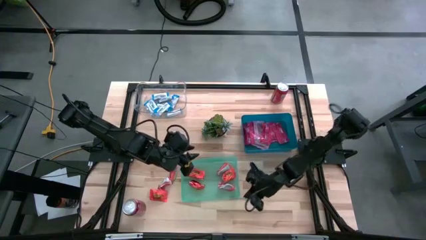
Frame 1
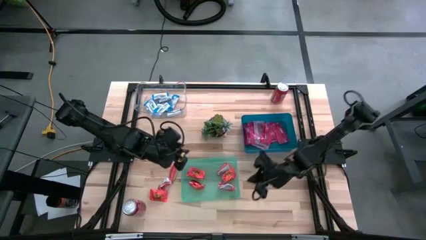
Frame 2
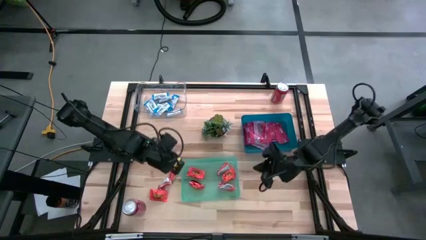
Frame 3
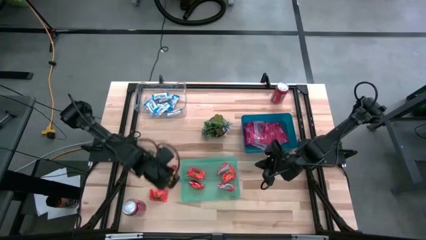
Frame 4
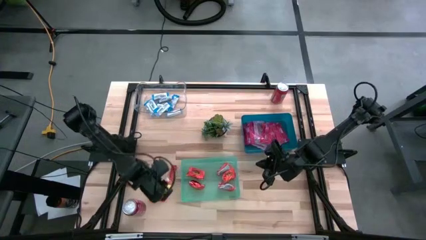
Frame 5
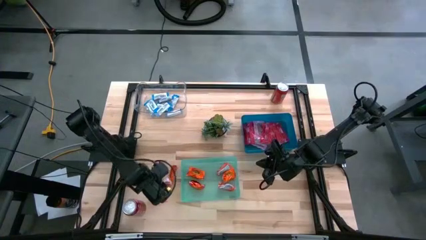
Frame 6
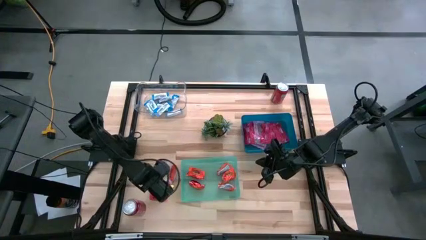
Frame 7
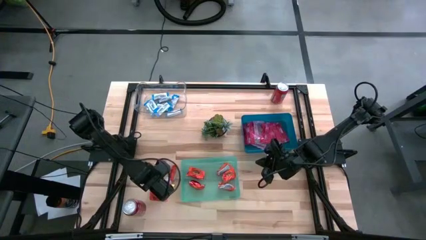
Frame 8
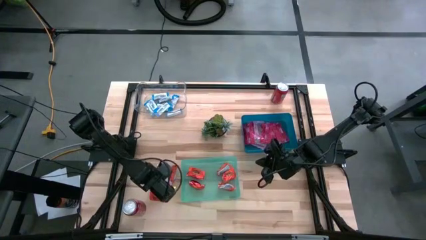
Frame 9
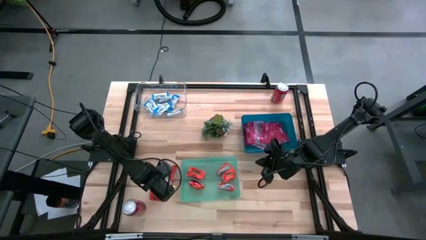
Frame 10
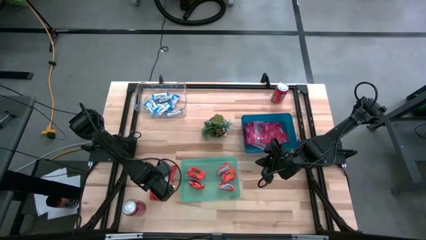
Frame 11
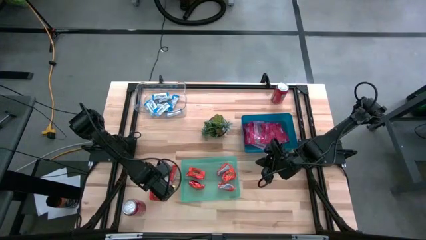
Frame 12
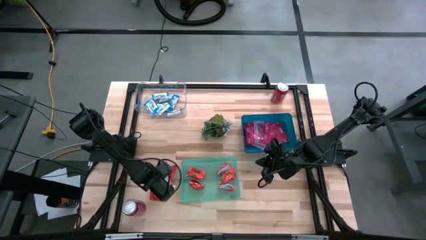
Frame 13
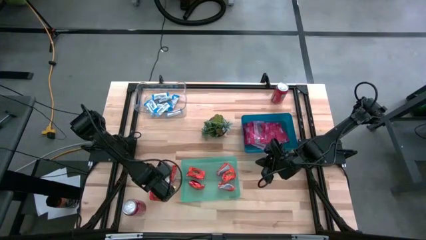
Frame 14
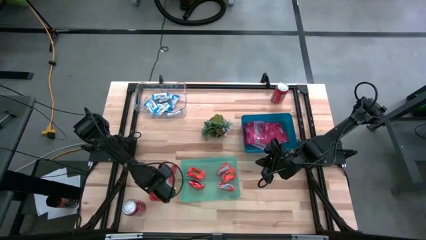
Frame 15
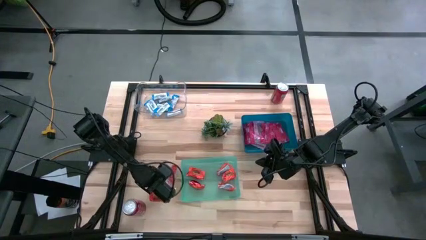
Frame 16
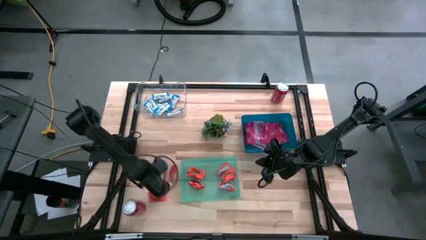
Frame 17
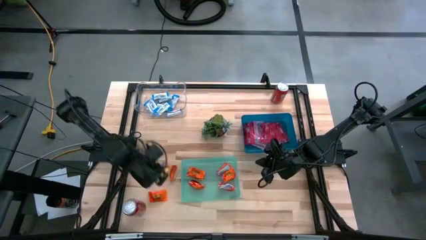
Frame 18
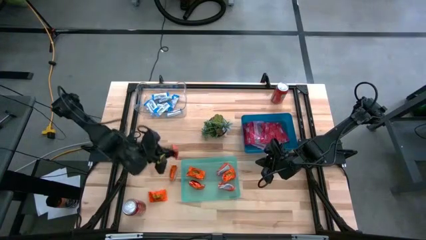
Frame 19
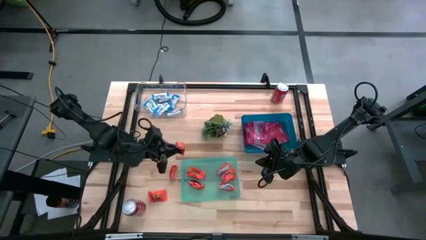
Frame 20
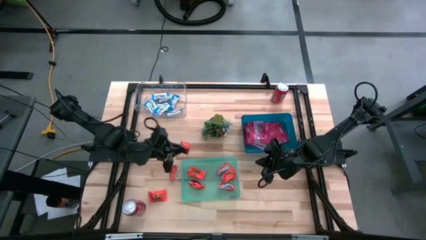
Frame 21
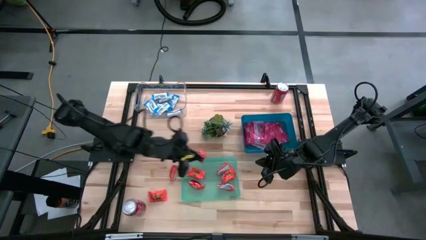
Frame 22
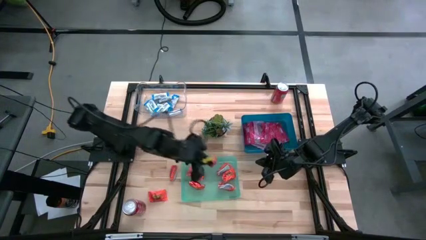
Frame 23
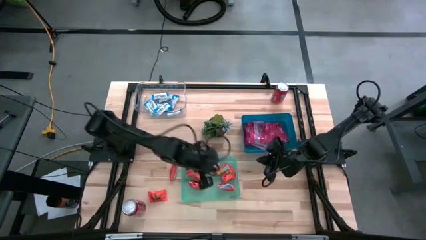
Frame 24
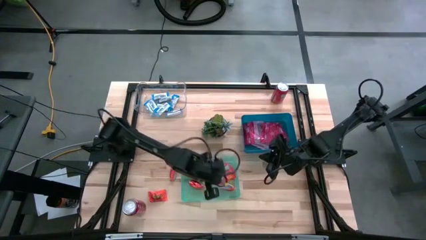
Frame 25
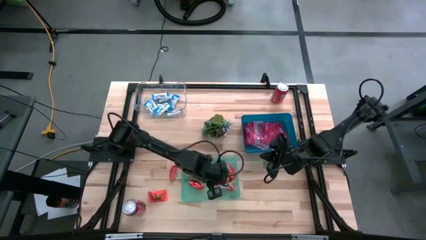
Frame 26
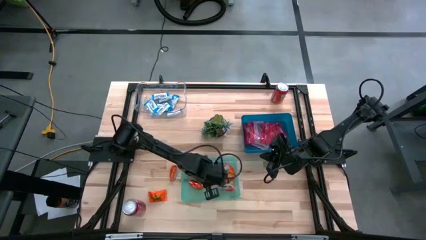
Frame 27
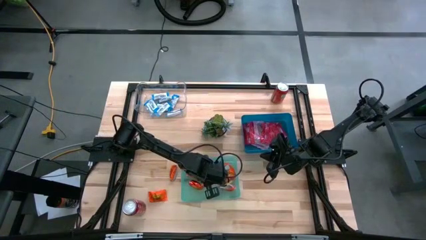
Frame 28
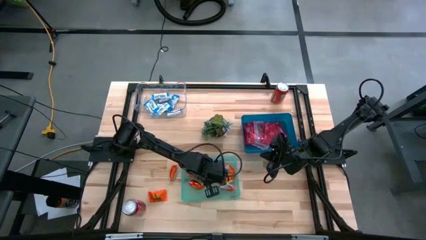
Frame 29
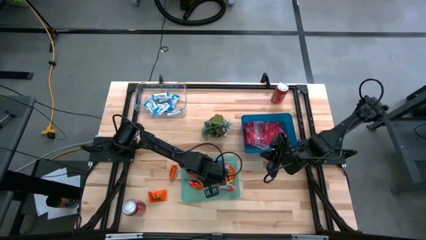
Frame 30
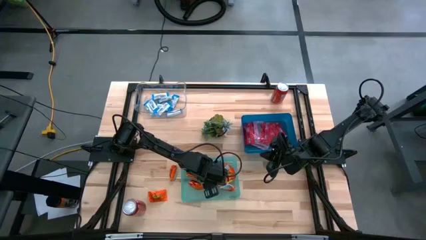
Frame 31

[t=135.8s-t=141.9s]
Task: Sort candy
Put the orange candy into the green transparent bin

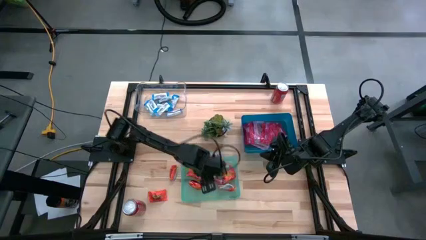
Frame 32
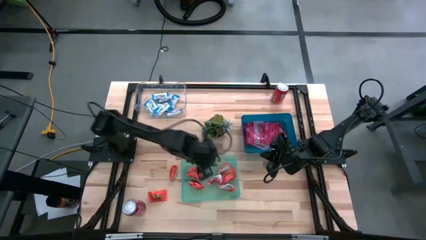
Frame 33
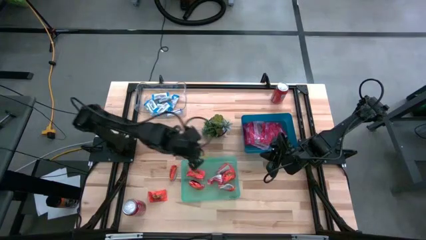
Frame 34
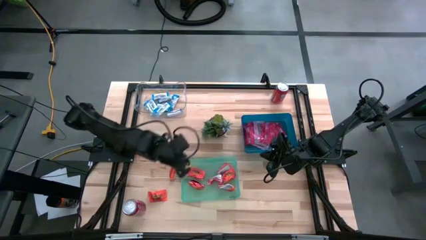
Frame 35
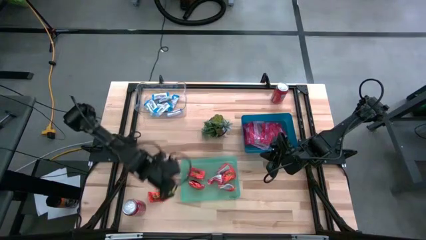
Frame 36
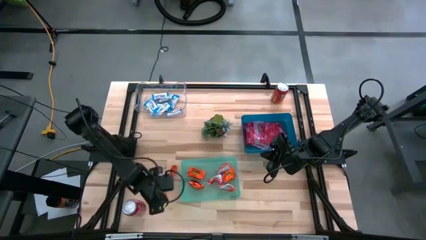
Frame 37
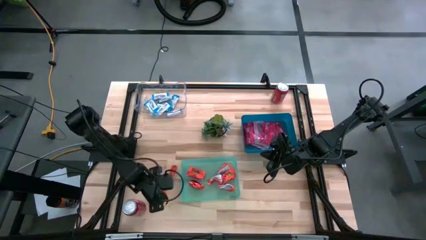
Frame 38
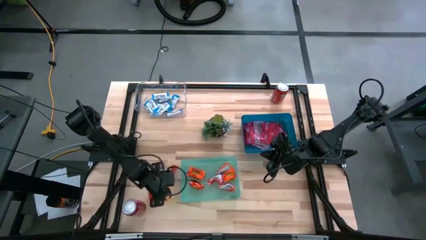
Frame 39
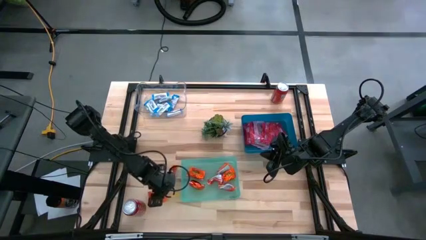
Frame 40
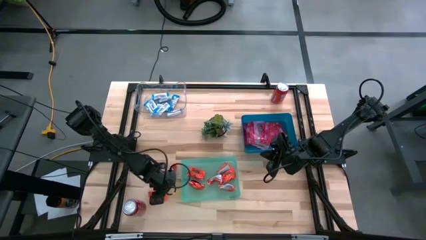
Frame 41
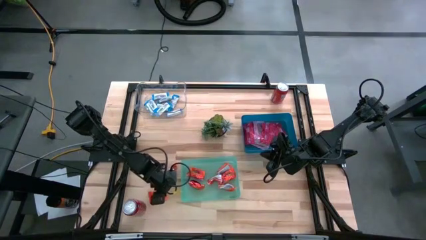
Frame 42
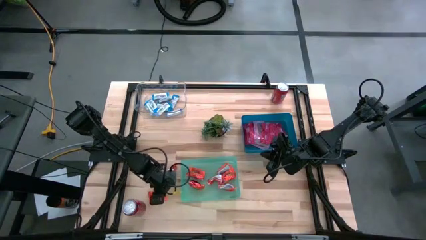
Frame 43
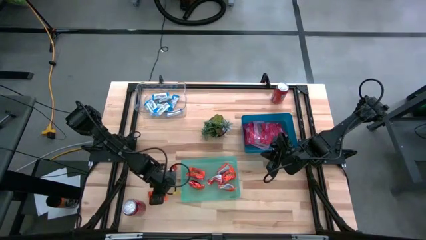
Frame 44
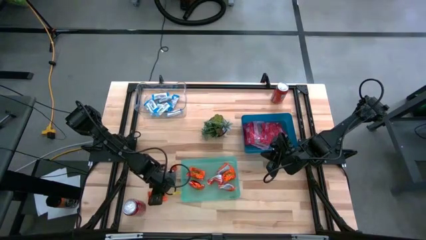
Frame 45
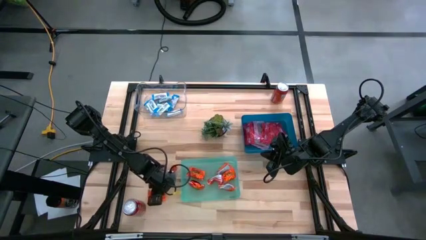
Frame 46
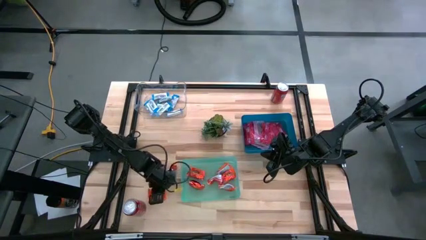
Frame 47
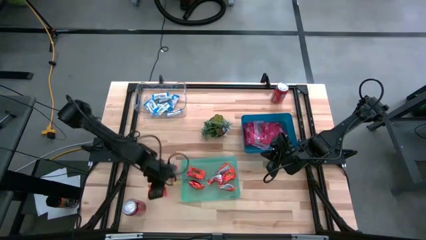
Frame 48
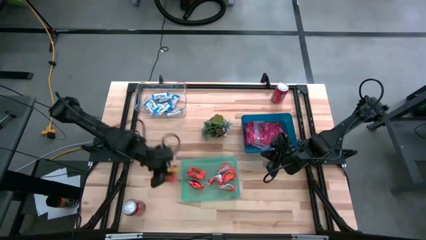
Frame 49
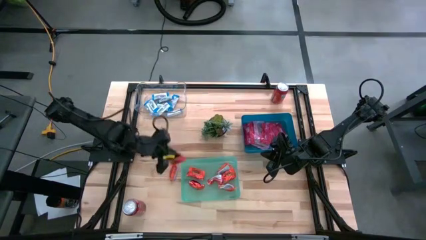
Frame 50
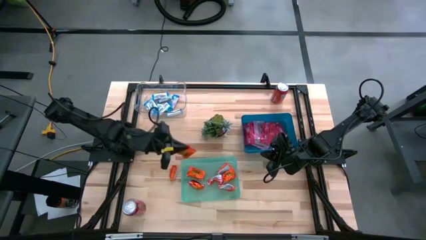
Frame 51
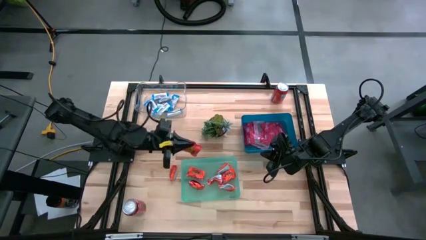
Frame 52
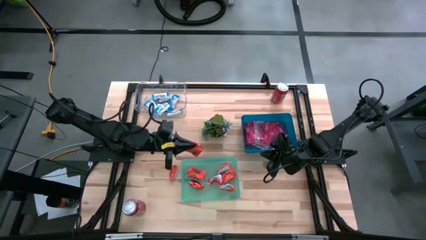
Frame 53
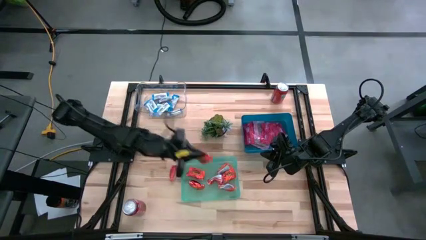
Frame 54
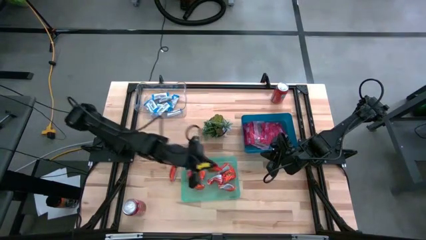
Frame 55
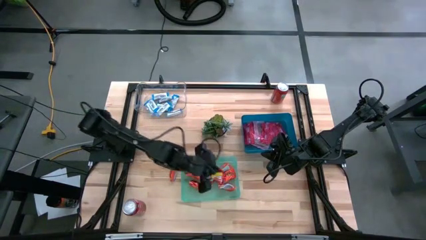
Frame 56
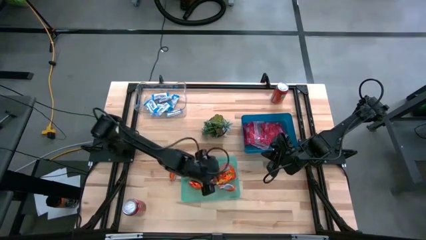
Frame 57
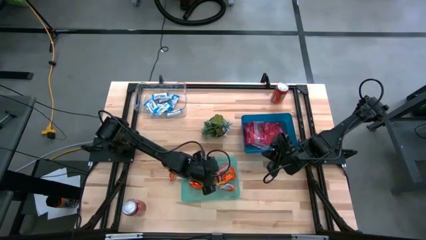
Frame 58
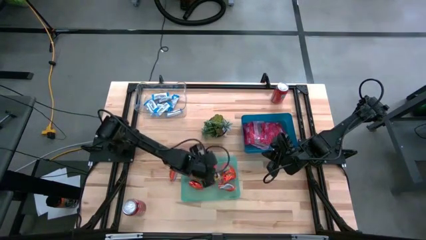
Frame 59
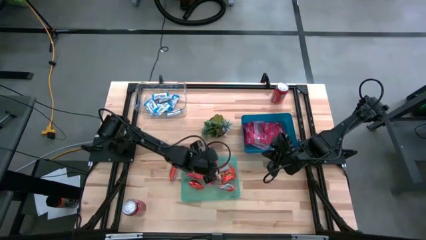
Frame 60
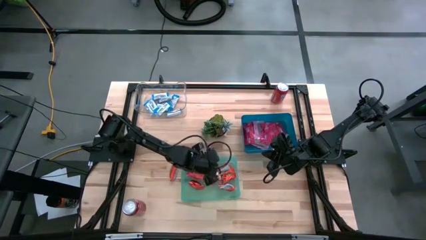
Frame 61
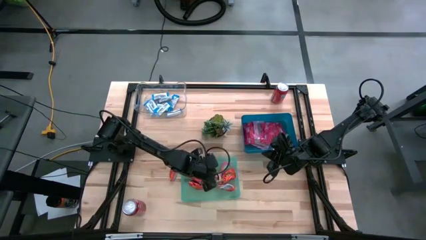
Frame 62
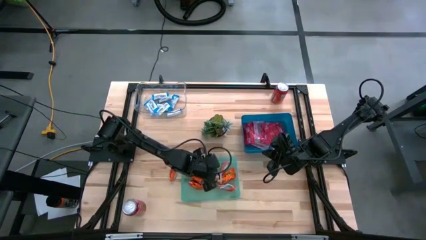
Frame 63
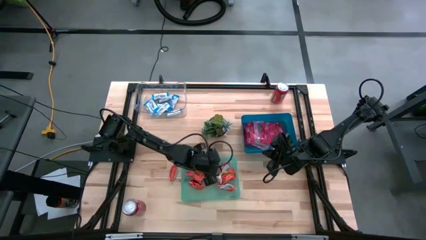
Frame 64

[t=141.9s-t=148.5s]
Put the orange candy into the green transparent bin

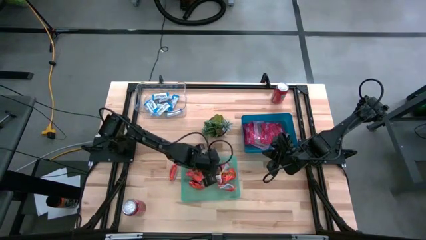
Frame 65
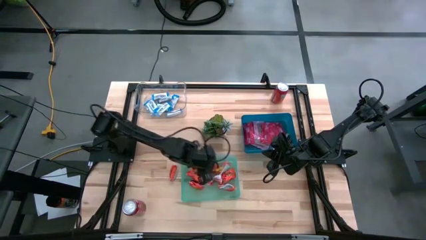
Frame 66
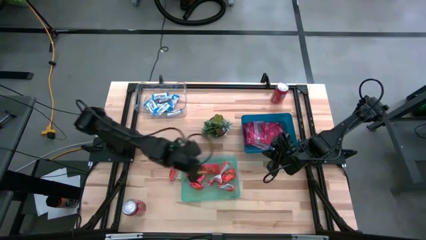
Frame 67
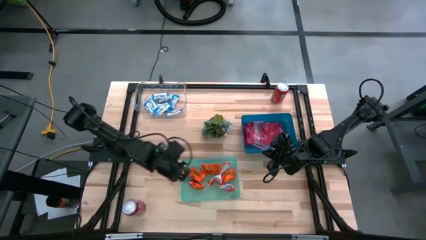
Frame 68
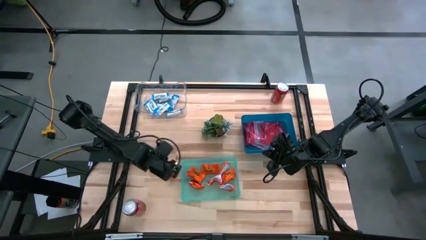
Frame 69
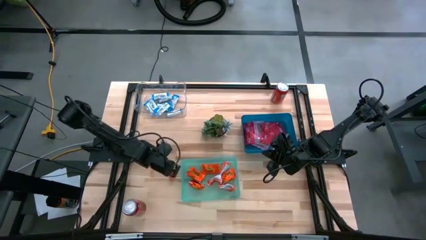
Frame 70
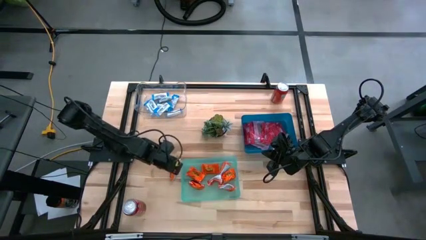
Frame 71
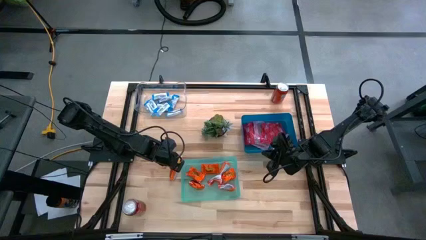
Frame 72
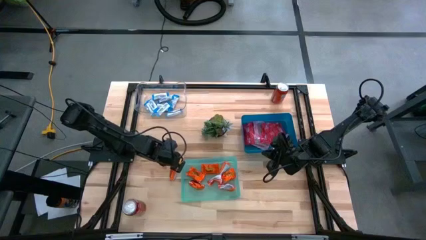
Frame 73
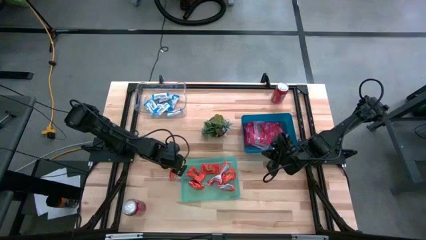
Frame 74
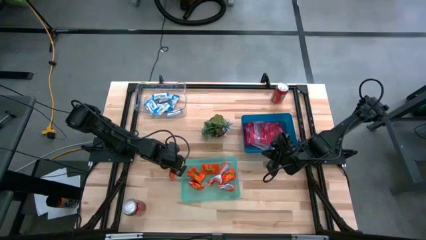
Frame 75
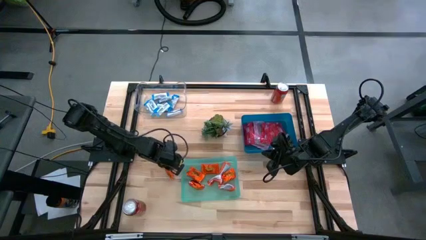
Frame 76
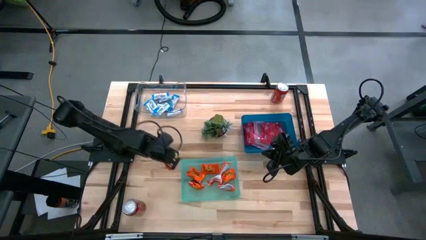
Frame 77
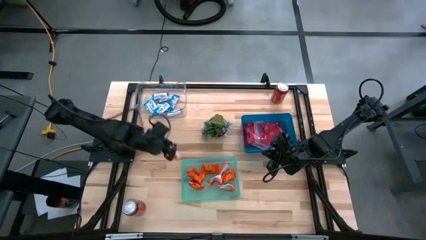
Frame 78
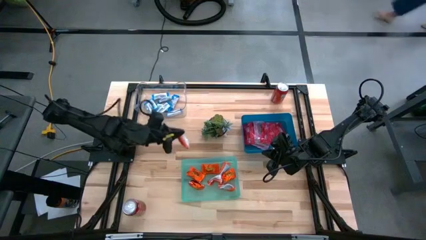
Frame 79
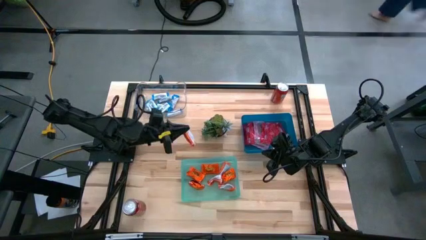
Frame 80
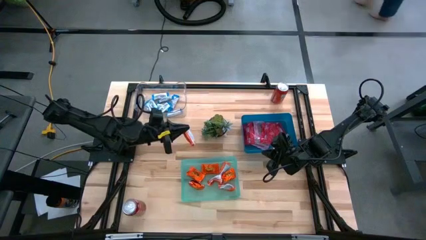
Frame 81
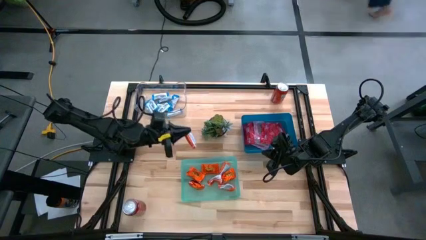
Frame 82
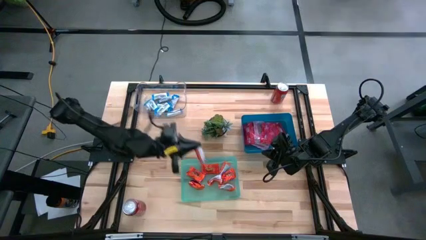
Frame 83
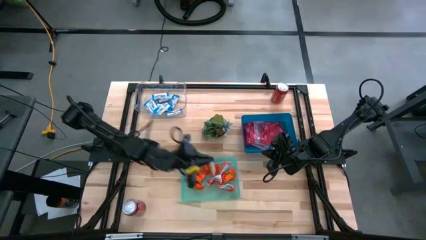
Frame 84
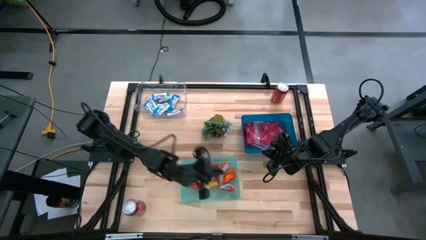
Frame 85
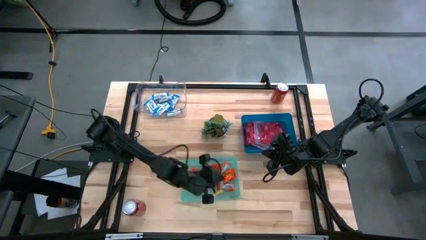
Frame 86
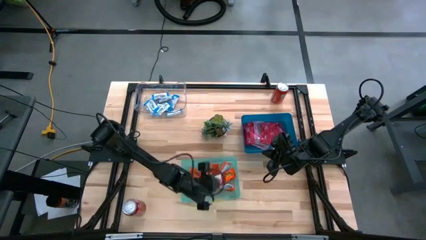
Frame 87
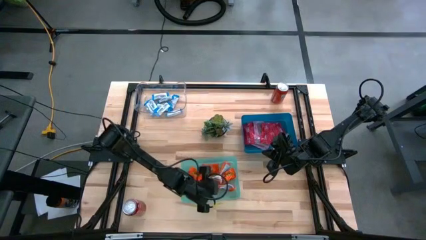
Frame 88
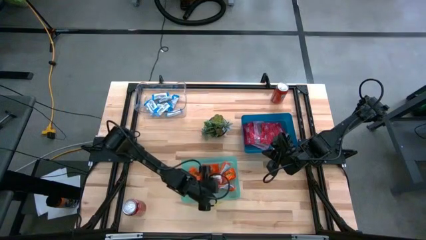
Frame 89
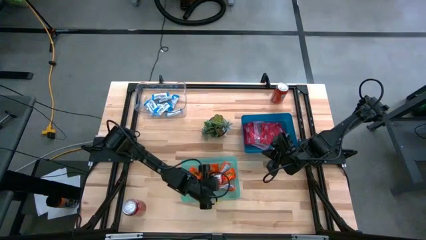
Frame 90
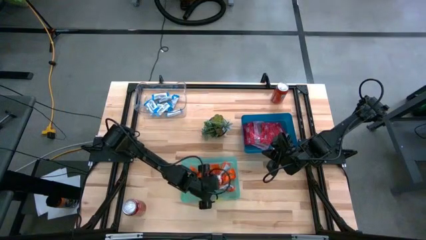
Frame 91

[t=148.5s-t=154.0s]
Put the orange candy into the green transparent bin
